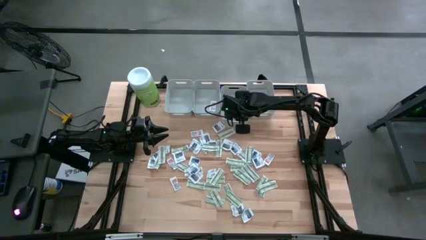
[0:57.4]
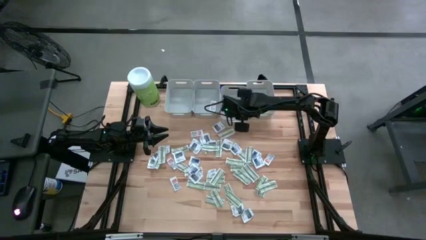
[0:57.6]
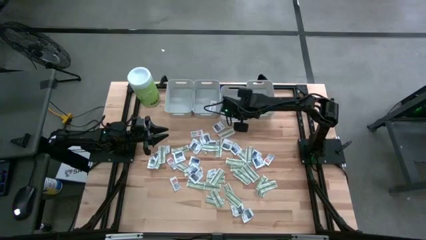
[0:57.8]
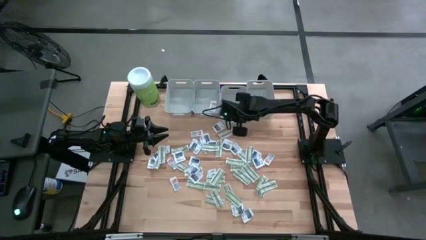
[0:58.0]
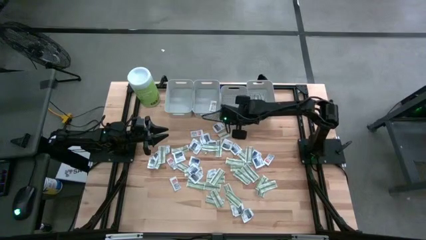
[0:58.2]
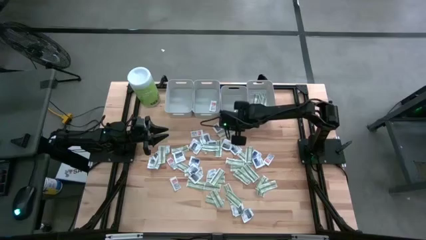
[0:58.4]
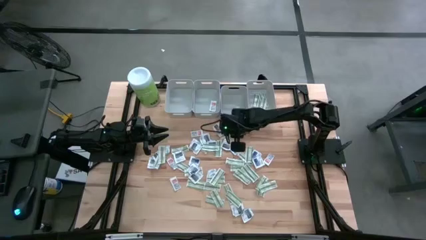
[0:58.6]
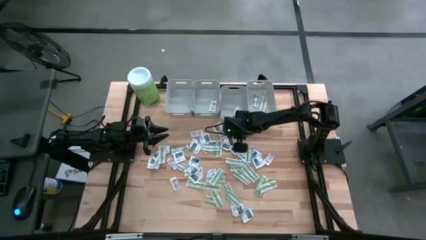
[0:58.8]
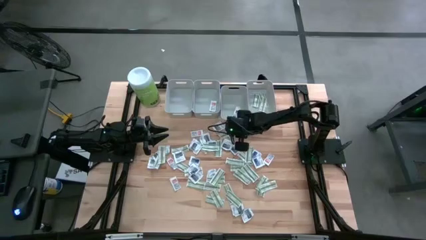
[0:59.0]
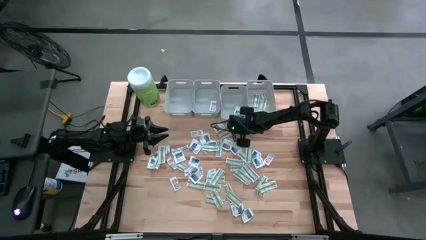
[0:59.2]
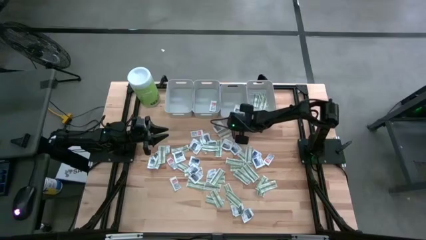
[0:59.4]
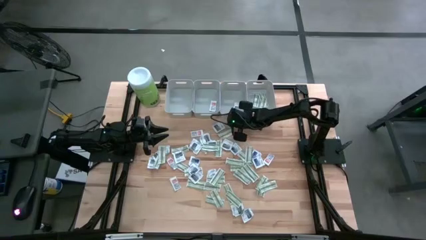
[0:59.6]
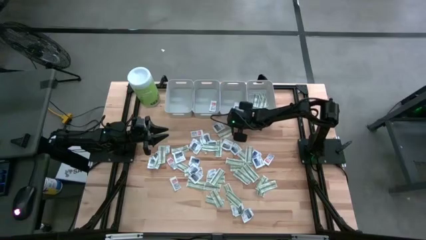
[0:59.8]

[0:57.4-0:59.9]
Task: Pick & Place First Aid Supplies
Adjust the middle right gray bin

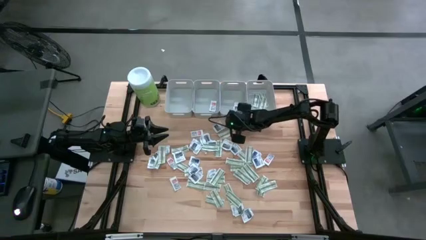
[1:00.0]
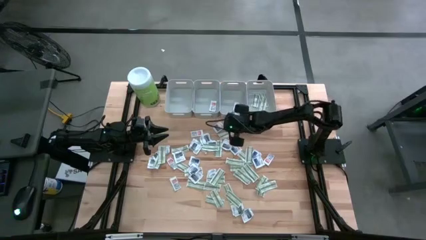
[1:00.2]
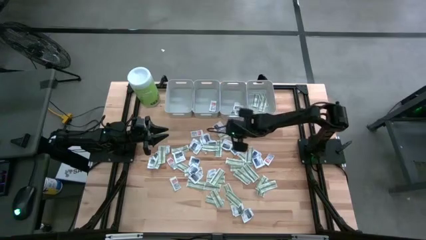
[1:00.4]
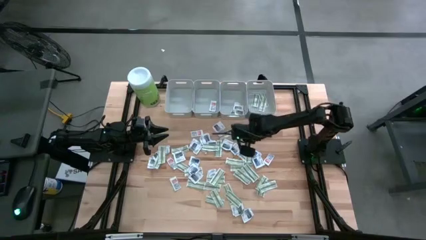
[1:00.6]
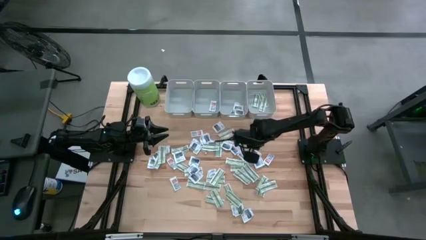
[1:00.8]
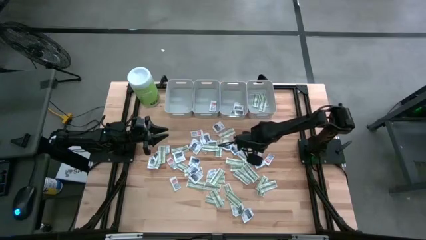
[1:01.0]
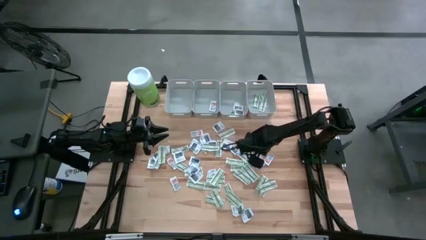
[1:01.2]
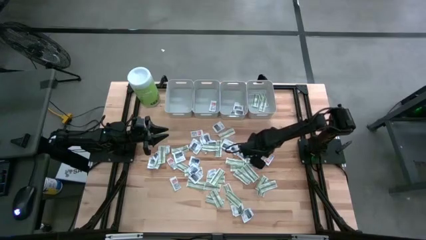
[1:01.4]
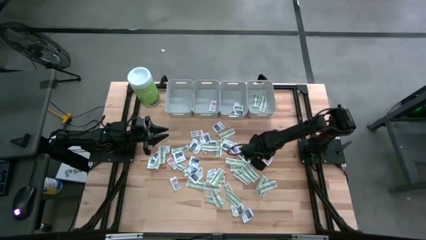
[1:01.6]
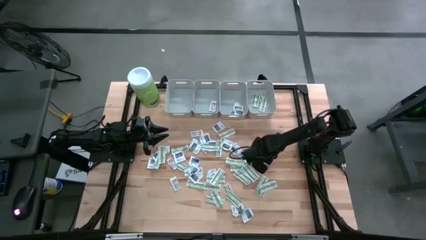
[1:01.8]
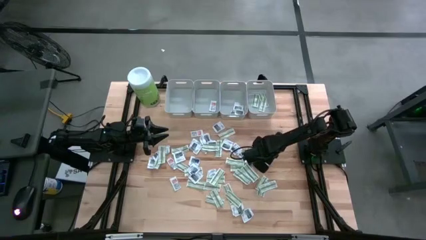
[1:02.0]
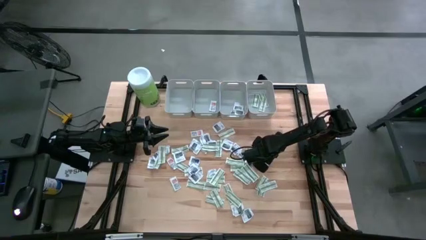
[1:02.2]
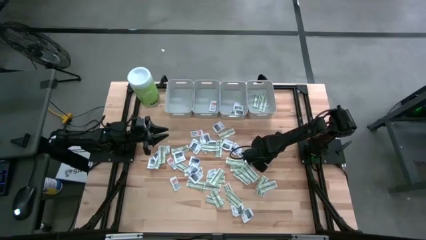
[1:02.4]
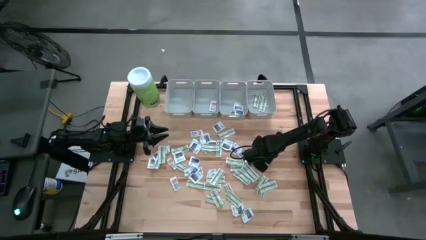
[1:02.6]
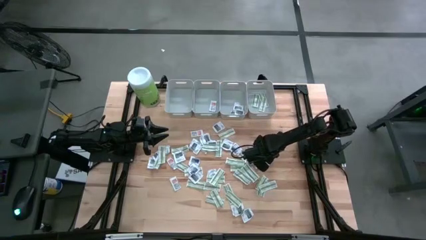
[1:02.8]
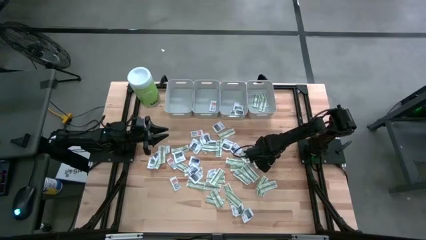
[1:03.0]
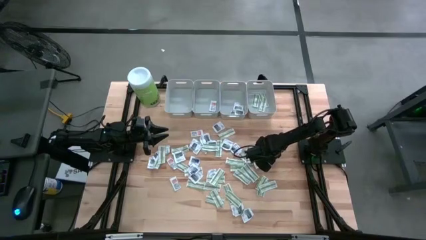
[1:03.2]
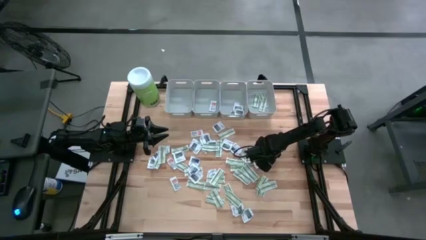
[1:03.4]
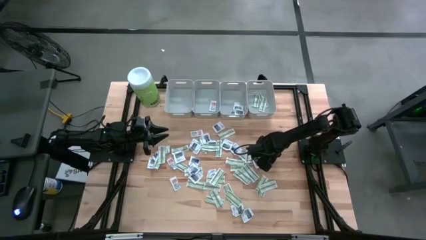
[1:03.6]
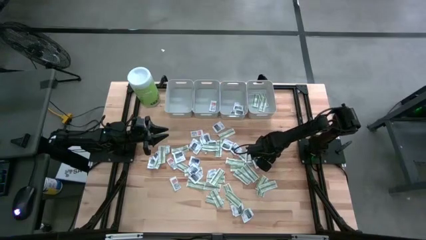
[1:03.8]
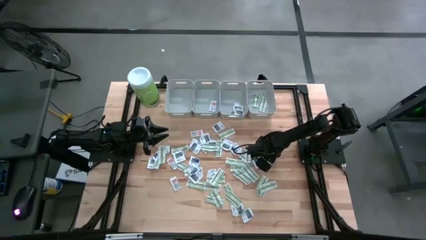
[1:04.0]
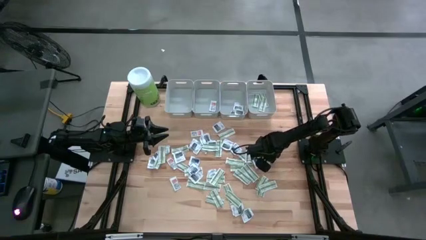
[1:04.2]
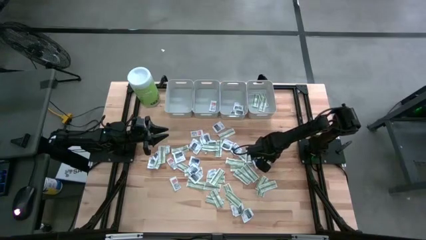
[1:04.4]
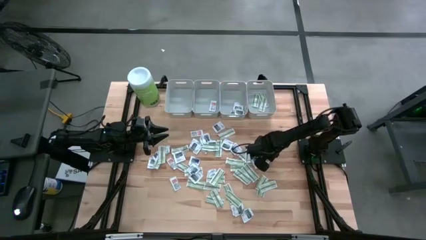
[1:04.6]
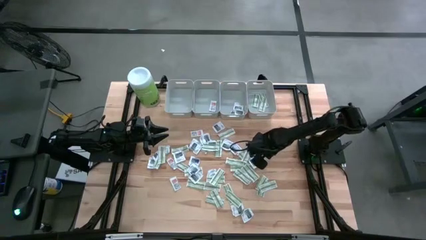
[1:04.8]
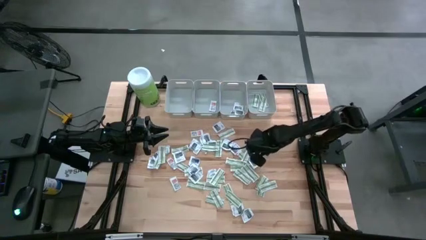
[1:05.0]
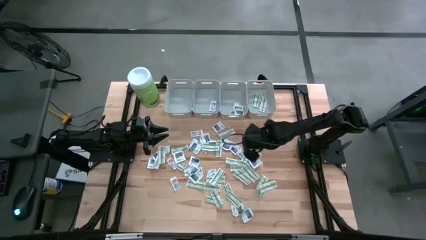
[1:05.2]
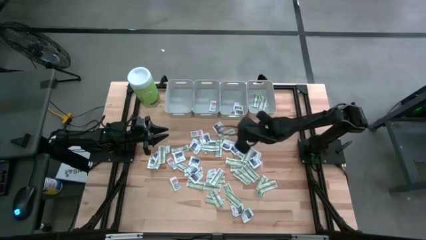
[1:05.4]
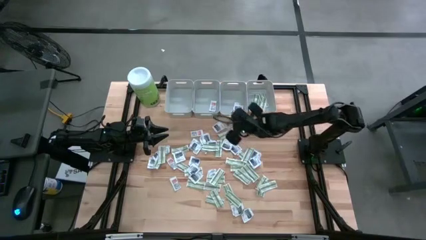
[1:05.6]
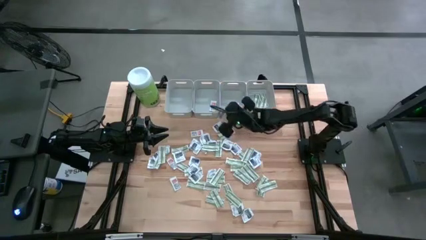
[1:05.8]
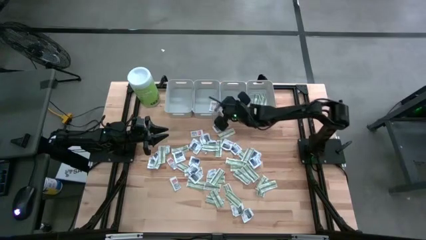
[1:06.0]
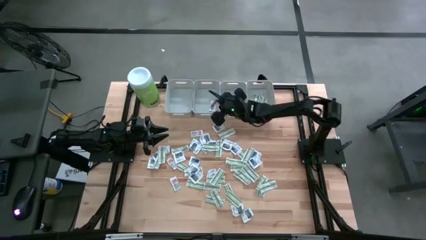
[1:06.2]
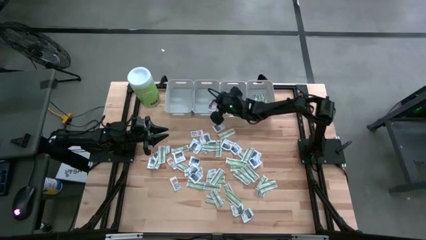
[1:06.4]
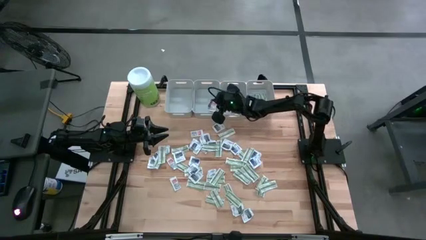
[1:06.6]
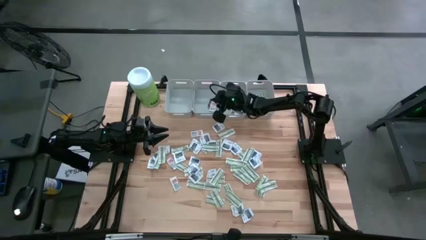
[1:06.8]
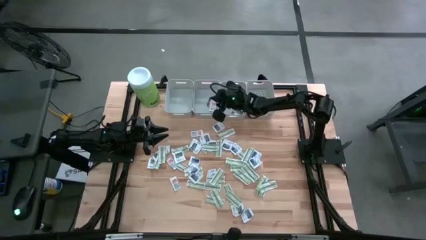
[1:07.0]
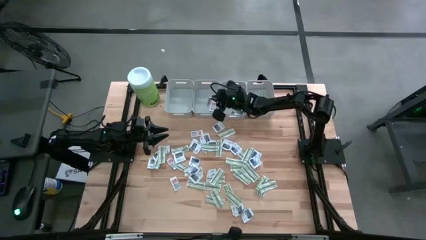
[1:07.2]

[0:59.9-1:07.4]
Put the ointment pack into the middle left gray bin

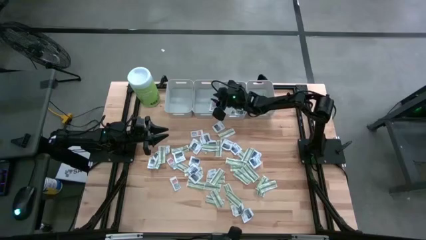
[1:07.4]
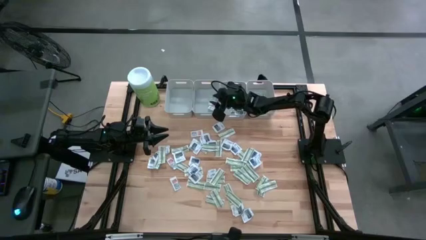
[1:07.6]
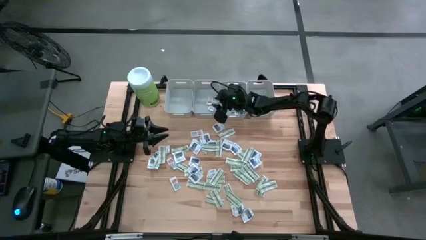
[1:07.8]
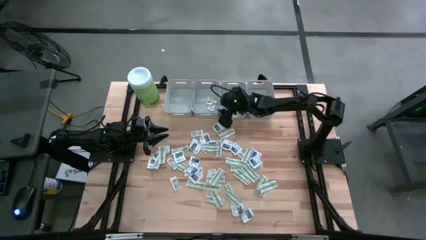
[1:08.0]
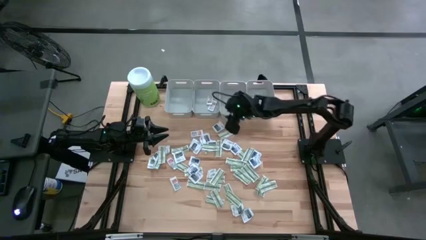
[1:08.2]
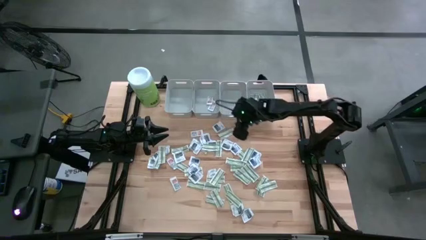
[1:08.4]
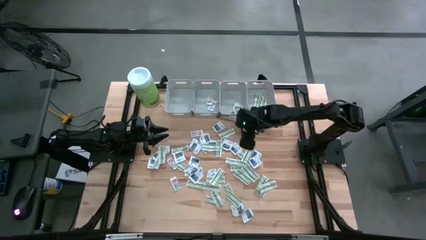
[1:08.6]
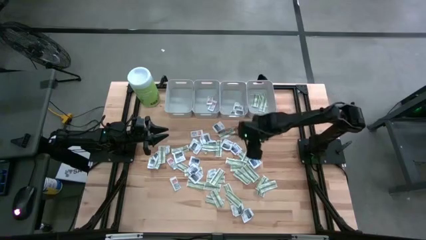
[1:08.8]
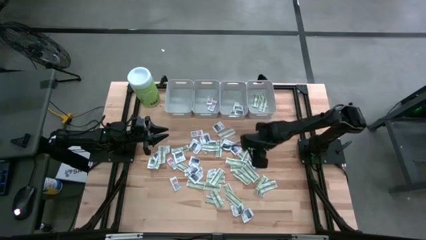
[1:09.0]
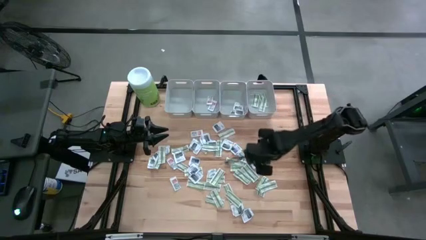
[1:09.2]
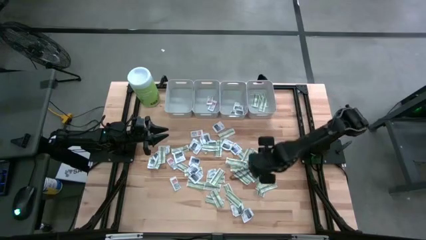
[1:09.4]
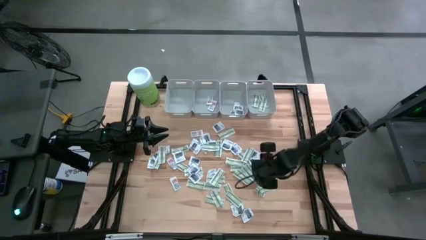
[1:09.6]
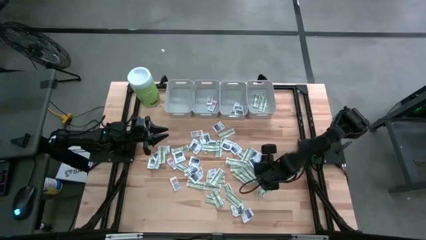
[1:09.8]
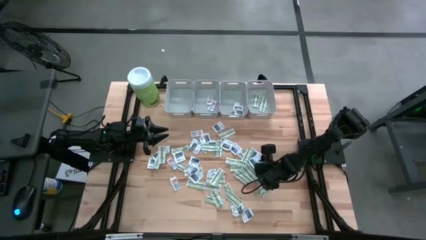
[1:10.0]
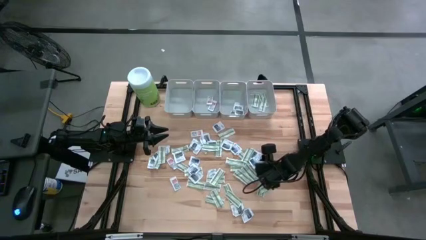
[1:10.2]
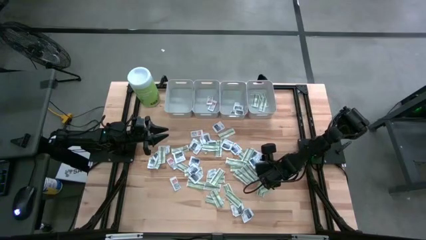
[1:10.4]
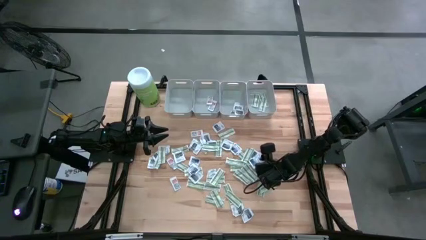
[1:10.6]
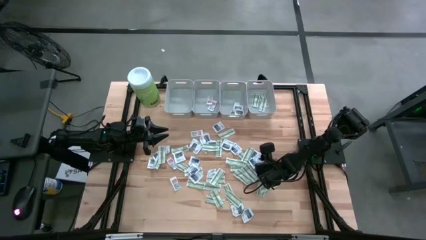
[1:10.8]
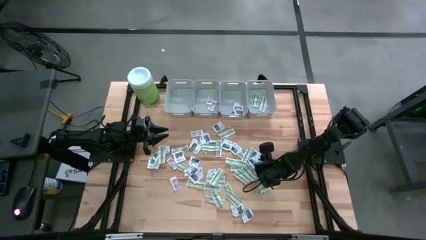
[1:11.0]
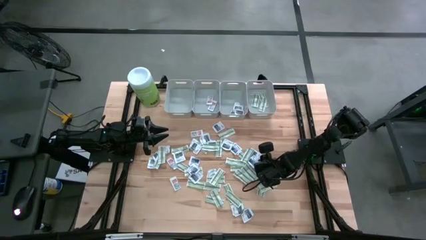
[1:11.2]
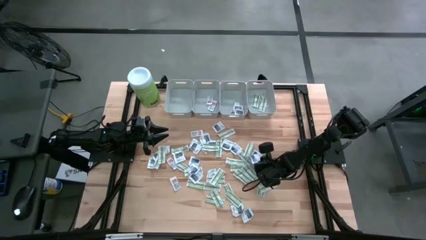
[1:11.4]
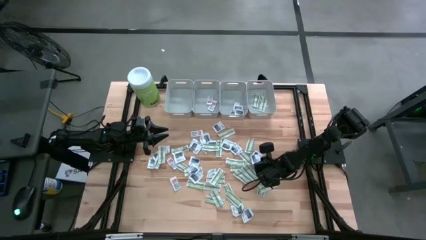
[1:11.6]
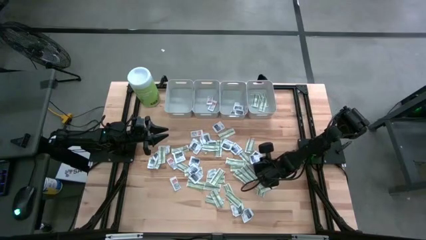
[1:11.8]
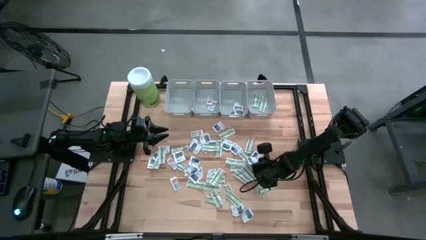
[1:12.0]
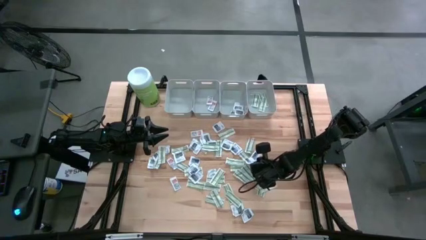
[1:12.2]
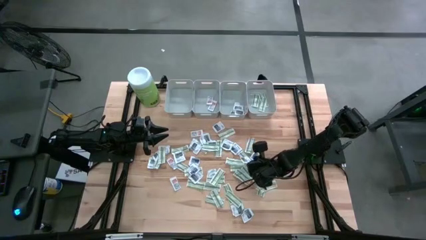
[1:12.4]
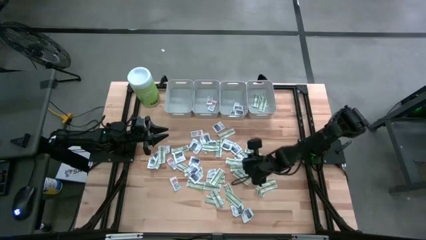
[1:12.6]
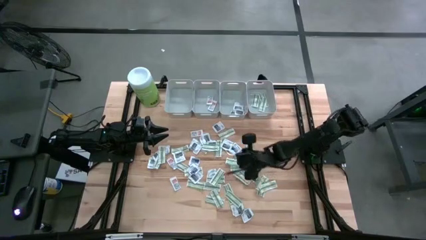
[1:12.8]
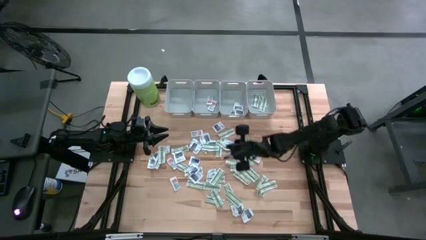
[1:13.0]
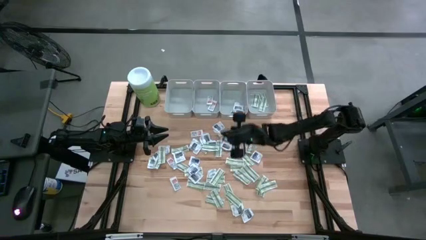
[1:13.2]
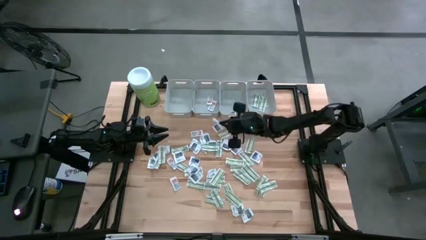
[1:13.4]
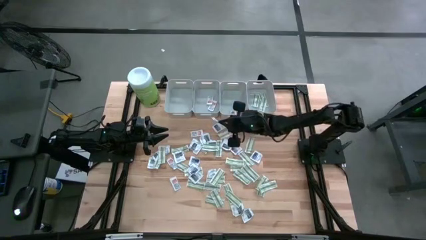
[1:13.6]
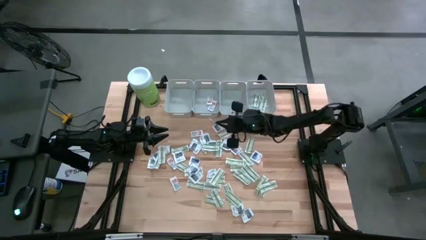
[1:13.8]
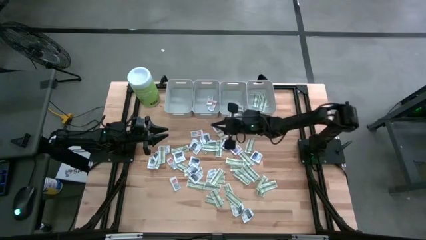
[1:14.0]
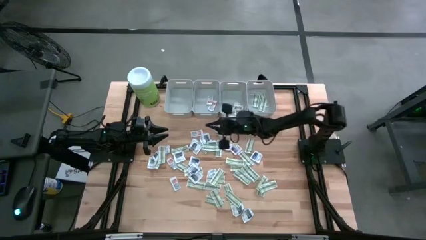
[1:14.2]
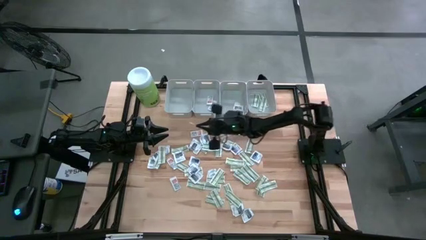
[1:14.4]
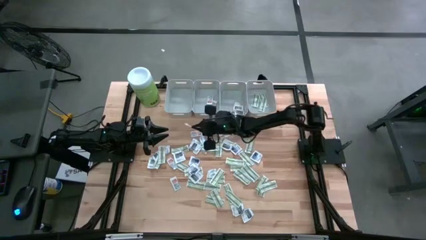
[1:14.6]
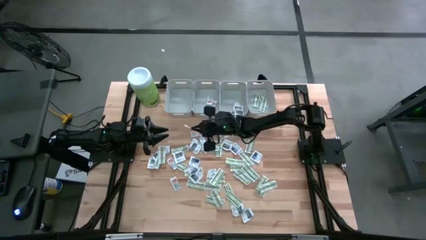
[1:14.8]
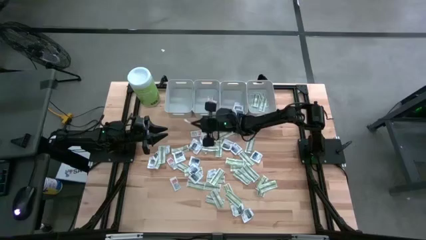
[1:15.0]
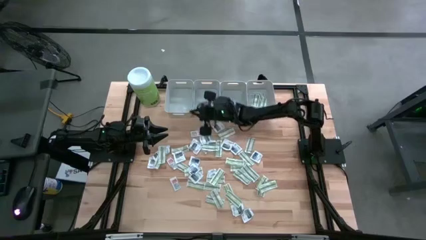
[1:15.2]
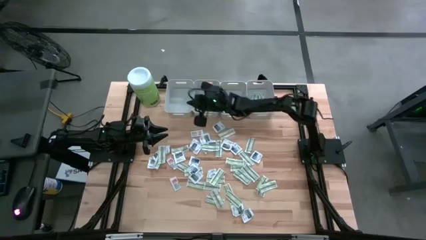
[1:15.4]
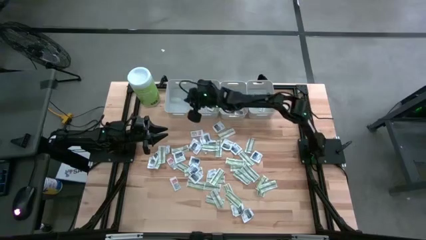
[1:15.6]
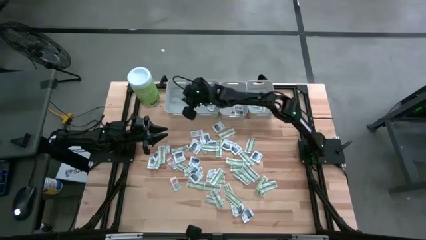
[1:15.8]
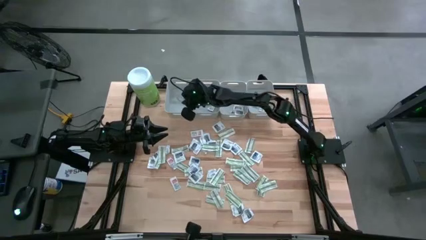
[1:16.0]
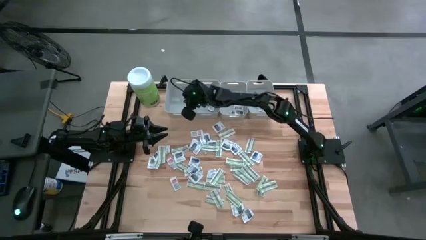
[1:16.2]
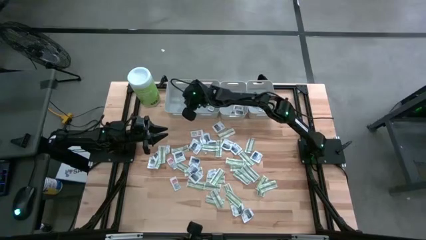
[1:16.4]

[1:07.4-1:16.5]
Put the alcohol pad into the left gray bin
